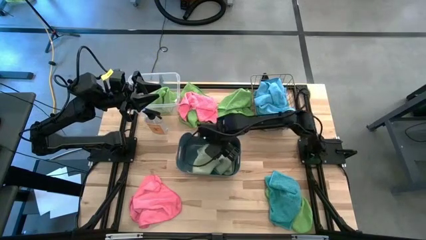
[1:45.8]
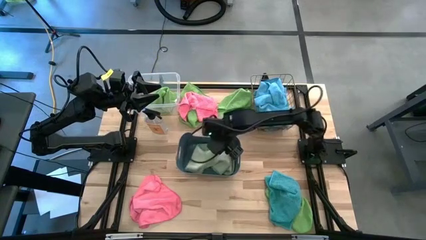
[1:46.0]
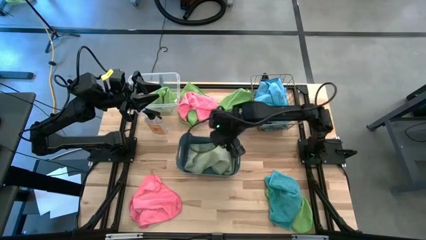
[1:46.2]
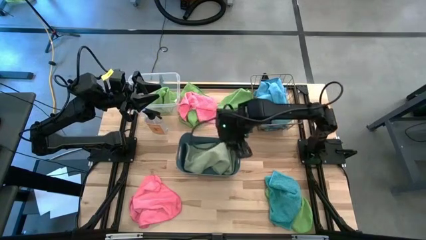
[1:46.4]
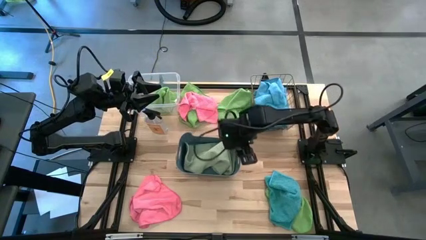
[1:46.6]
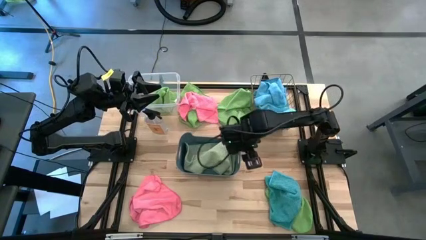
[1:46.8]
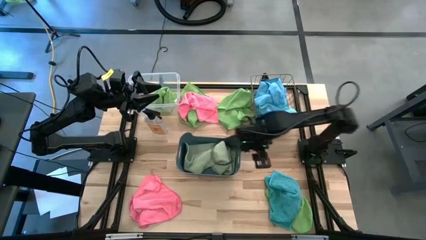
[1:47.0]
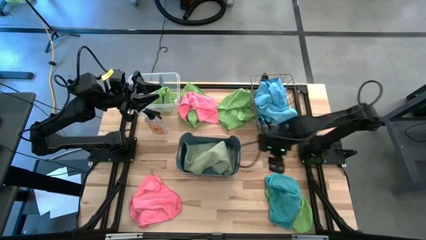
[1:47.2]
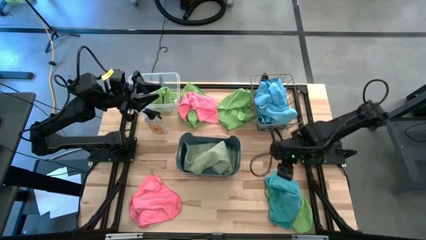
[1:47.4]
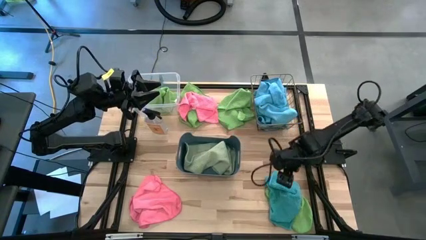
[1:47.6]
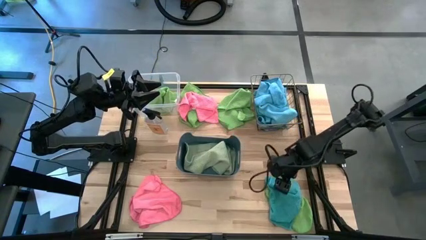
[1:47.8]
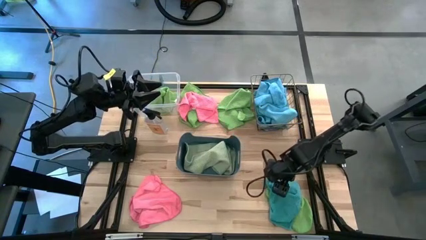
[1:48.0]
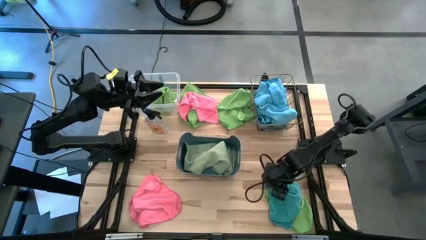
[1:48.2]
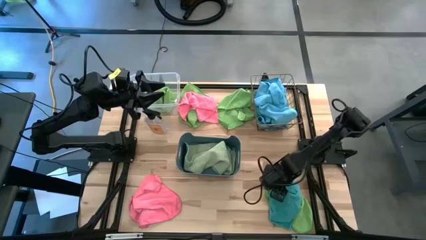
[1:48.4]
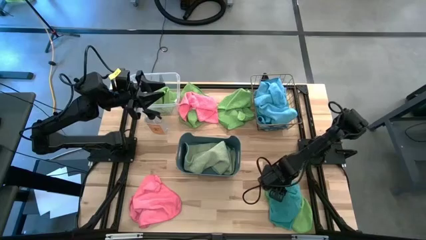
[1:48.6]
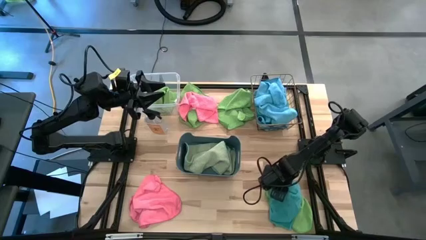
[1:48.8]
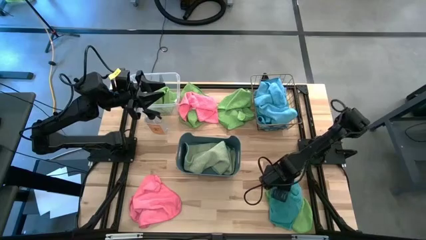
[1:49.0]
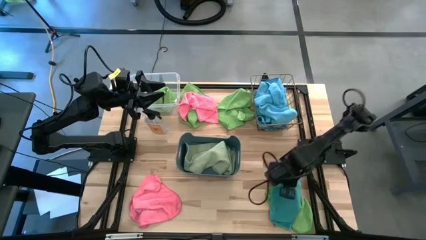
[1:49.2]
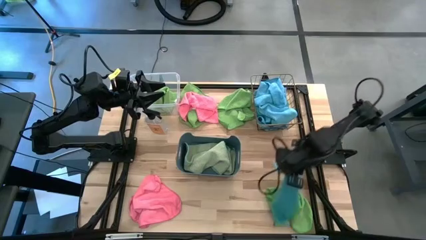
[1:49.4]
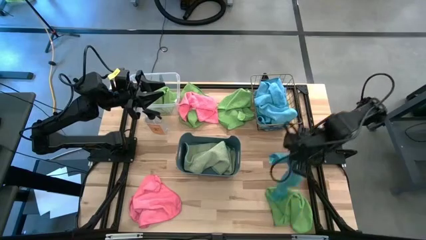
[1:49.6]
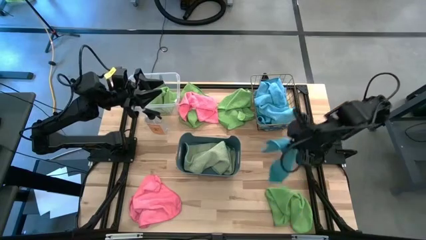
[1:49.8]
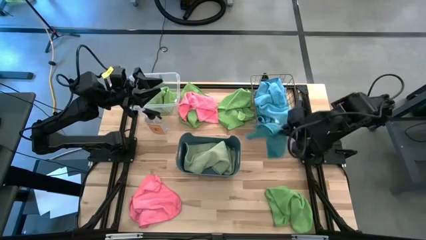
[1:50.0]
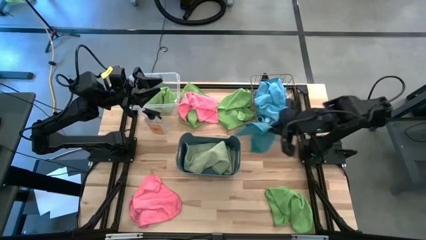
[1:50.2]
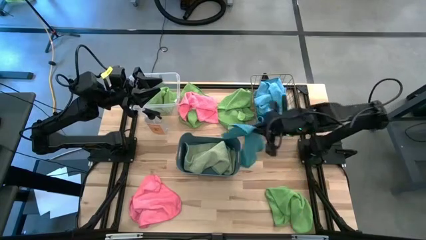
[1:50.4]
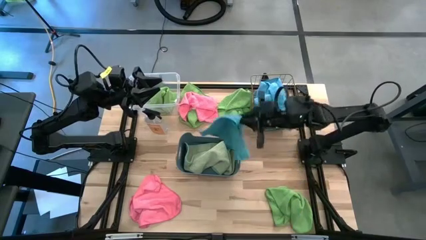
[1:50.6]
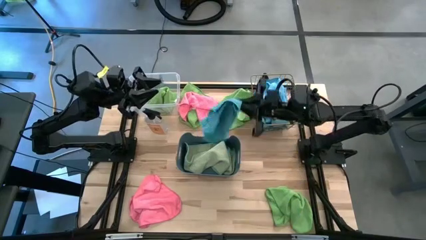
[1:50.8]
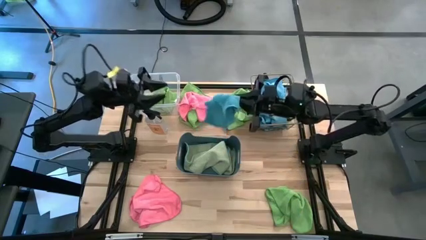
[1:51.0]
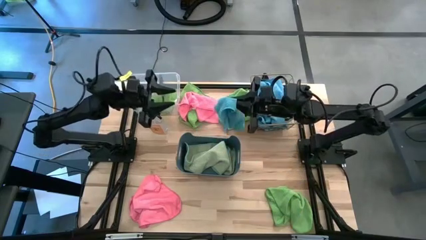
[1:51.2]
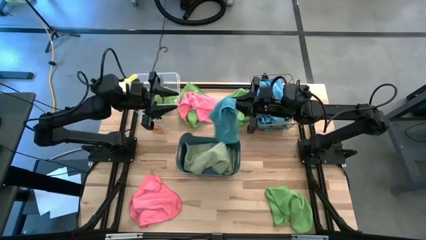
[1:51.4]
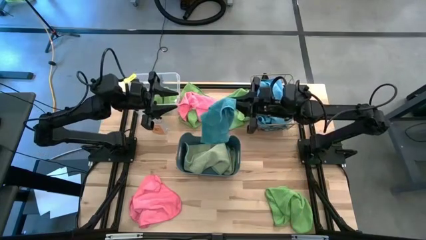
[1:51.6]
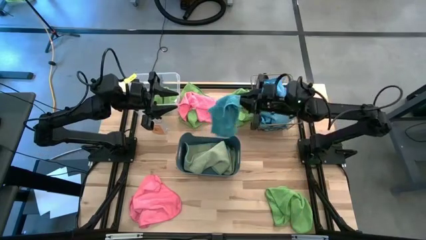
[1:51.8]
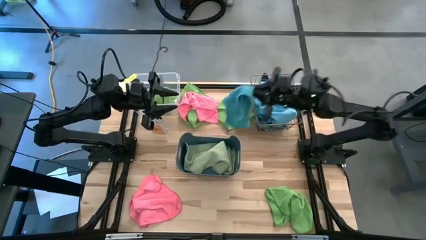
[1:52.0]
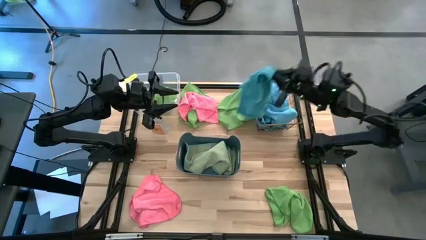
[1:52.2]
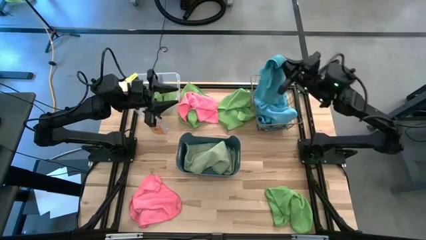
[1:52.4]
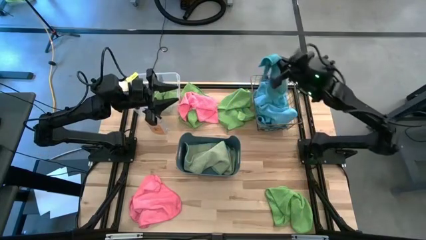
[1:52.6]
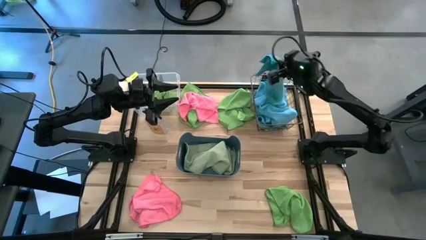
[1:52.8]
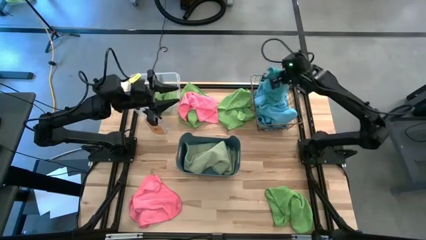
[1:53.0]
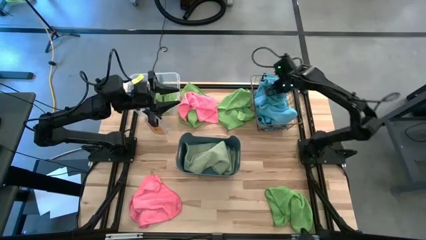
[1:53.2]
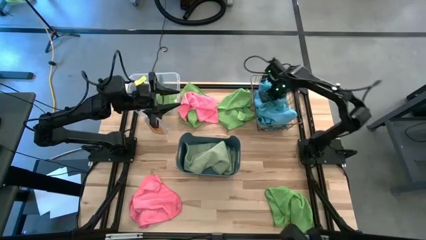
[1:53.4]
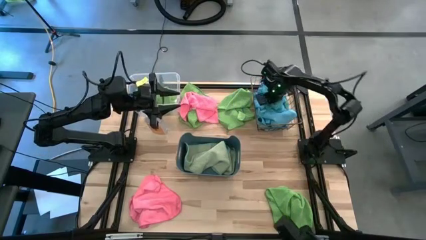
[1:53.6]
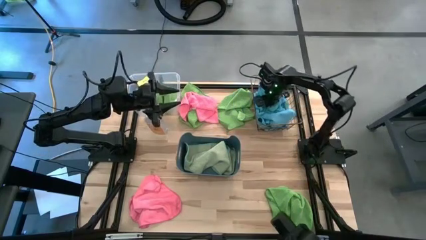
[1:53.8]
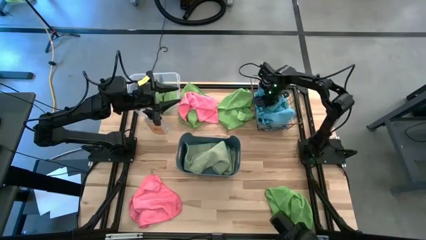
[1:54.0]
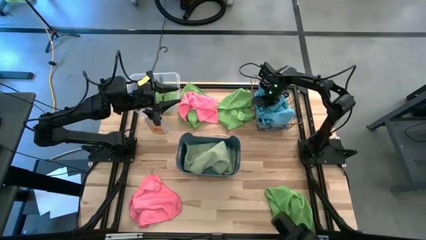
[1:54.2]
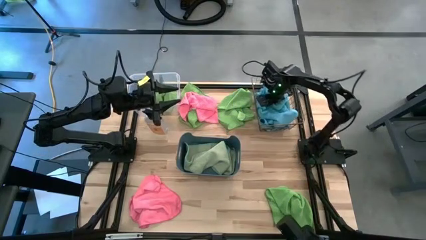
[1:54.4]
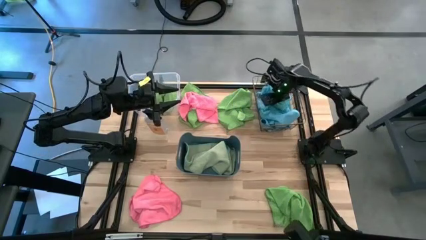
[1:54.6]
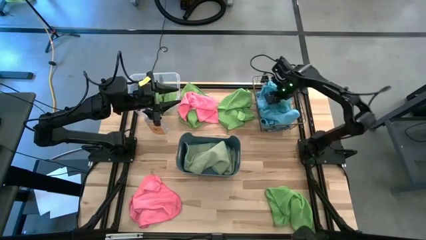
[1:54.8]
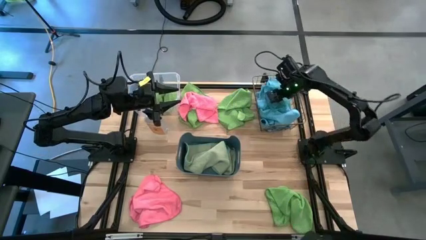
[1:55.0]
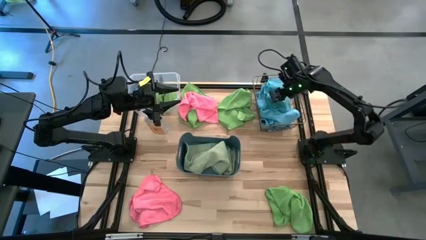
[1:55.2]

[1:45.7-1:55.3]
Task: Sort microfiber towel by color & place in baskets
Put the blue microfiber cloth into the gold wire basket
